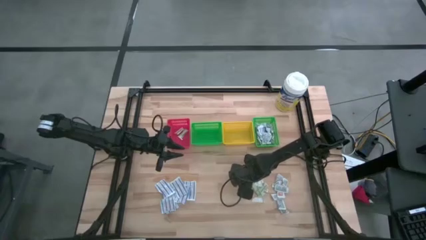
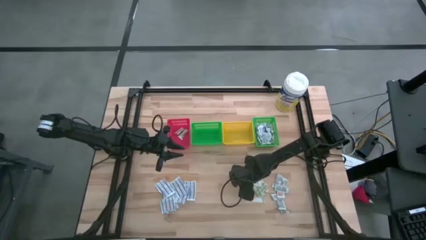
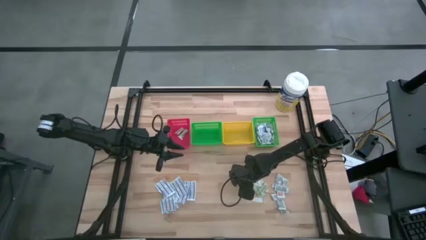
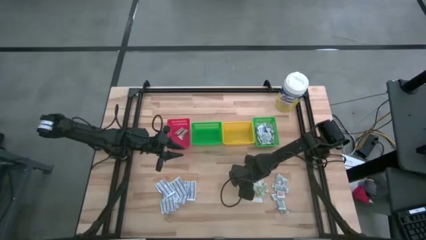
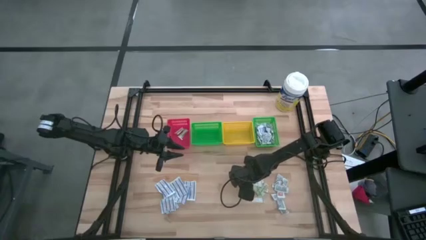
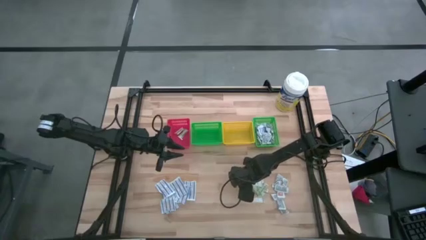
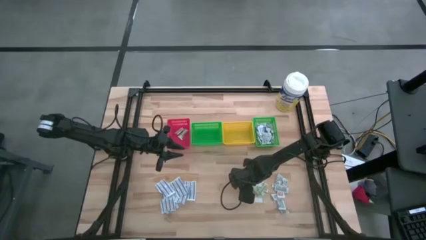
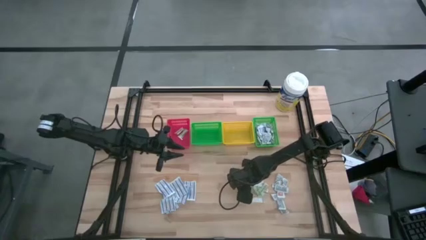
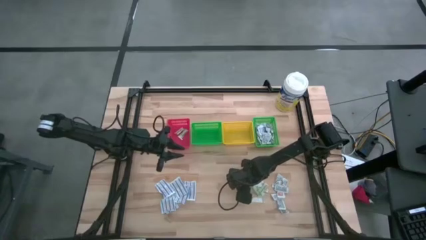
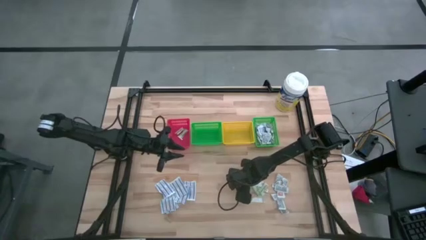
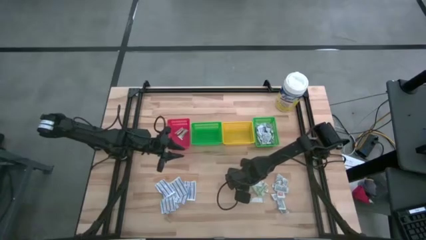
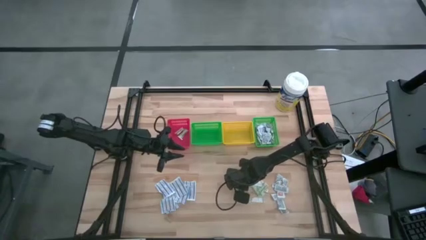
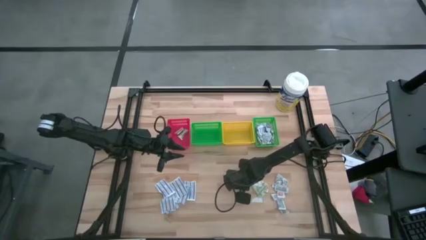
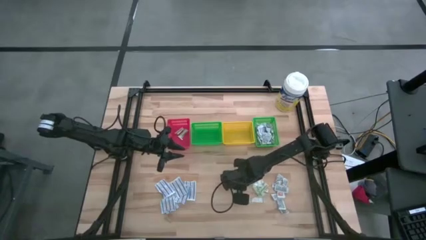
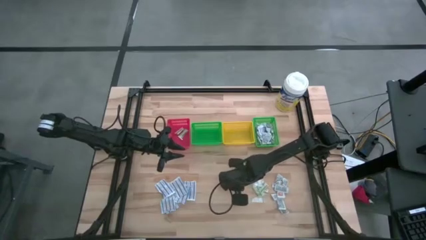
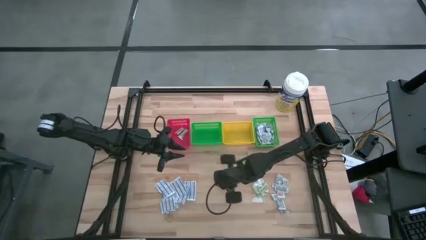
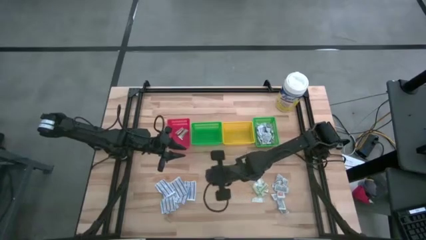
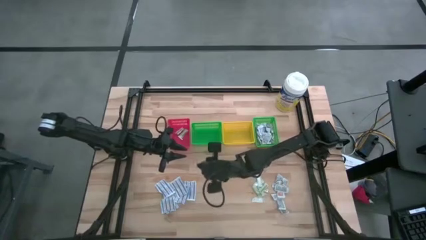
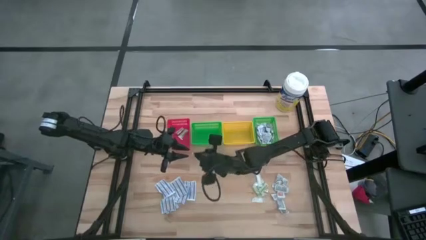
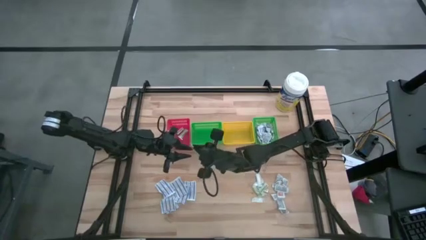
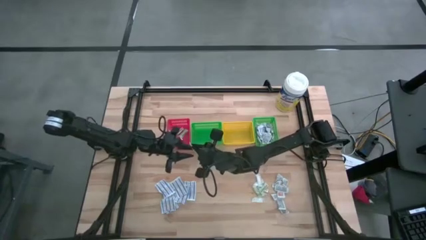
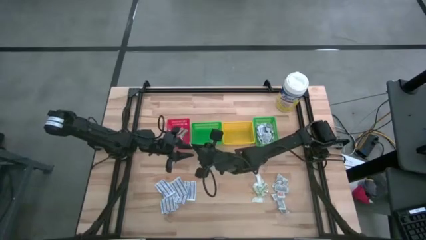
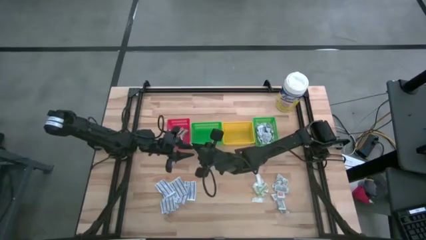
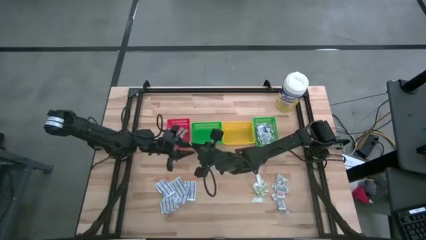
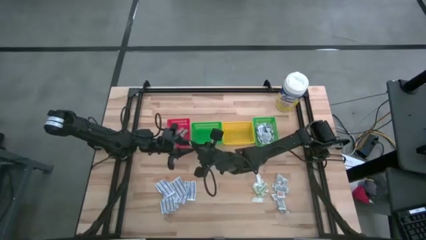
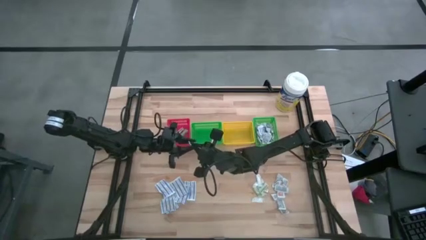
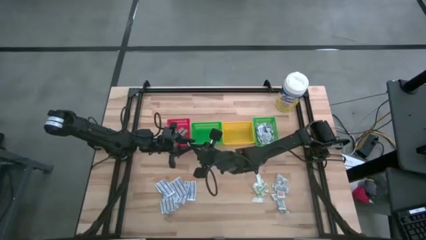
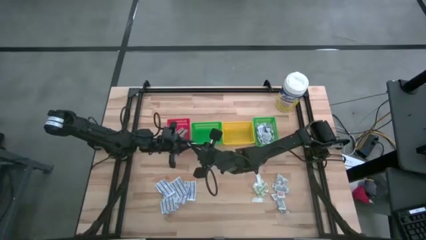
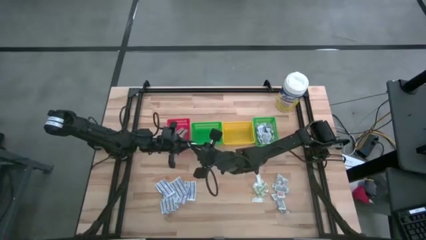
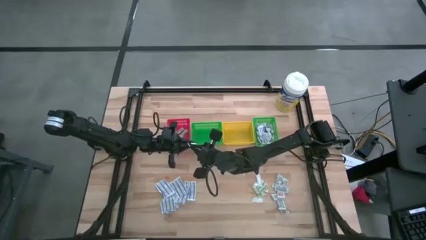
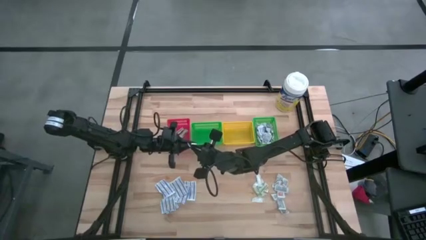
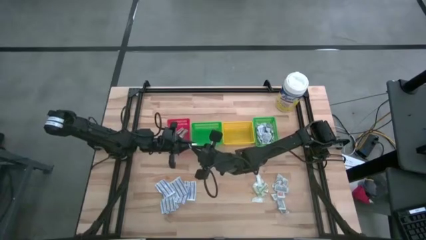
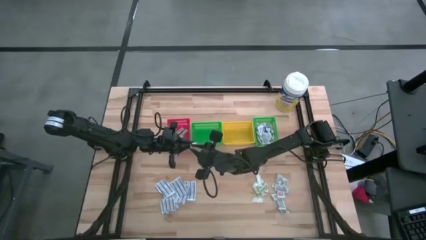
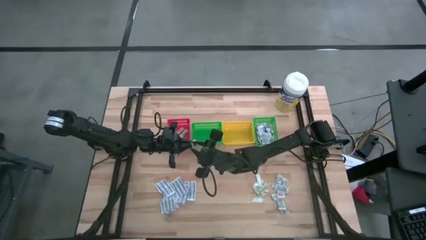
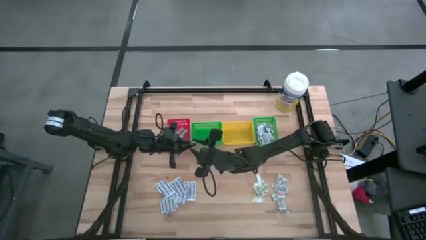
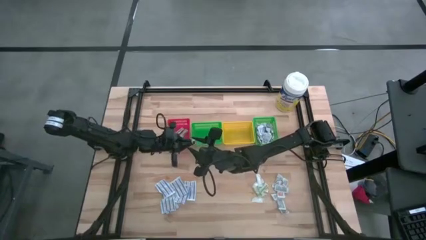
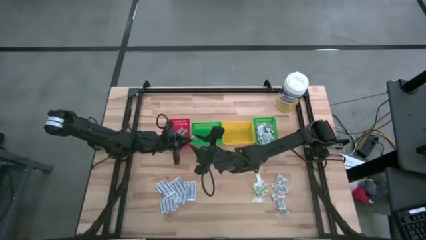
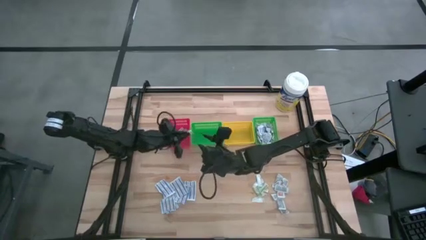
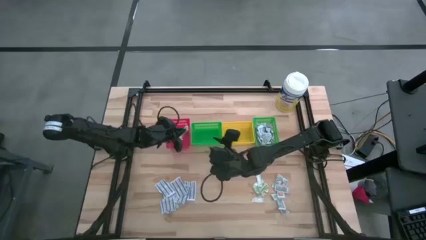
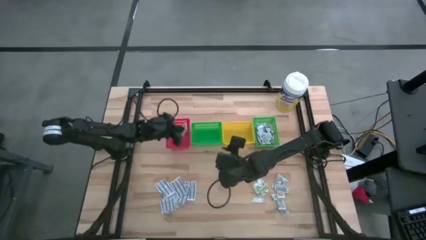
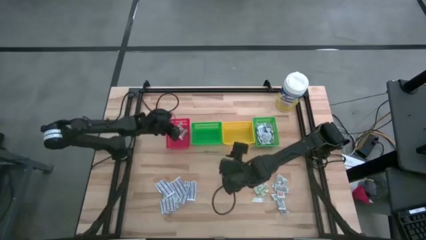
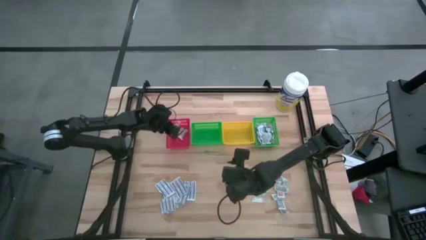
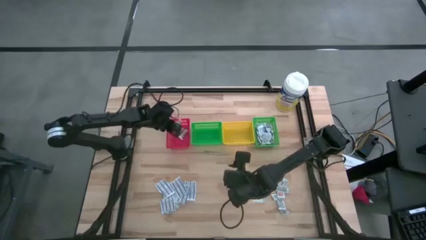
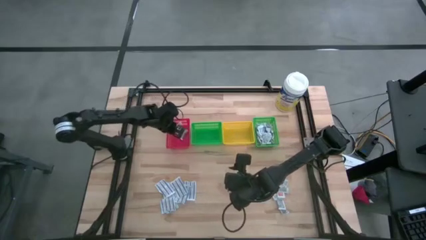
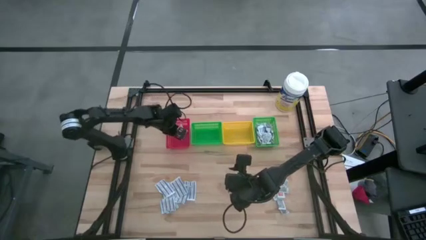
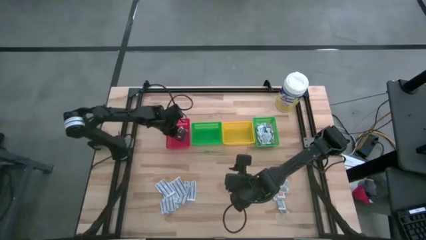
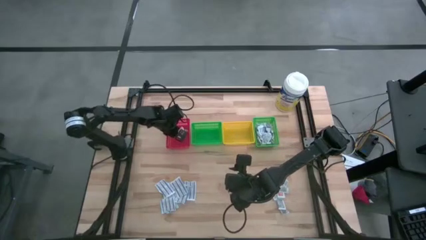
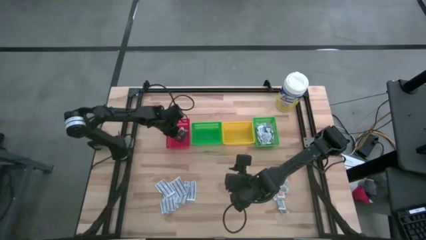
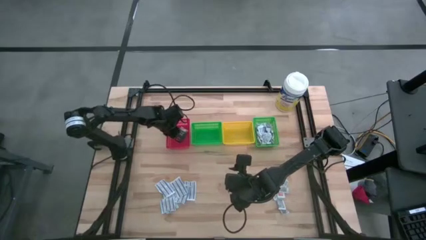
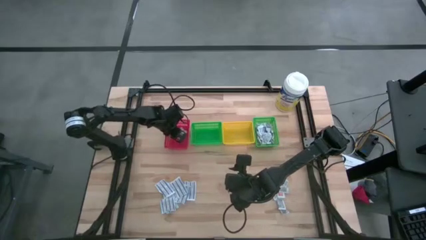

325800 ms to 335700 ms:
Task: Pick & Place First Aid Supplies
Put the green bandage into the red bin
